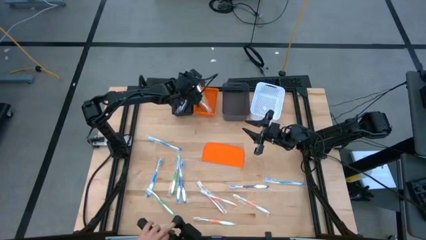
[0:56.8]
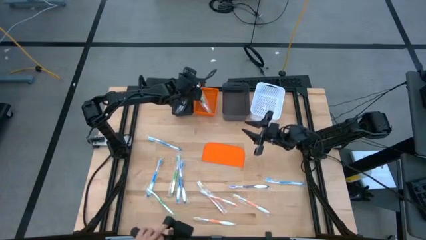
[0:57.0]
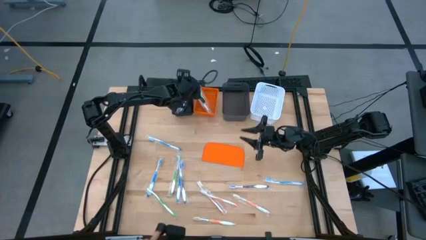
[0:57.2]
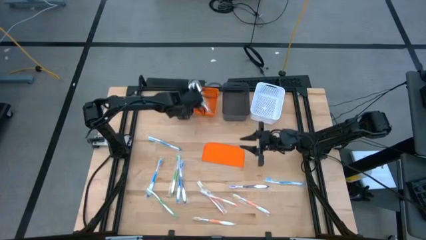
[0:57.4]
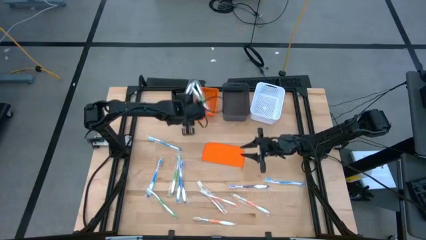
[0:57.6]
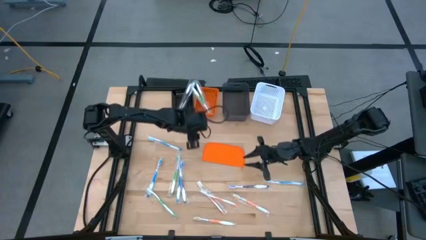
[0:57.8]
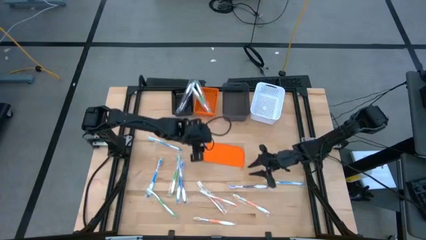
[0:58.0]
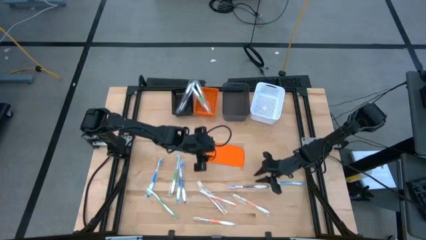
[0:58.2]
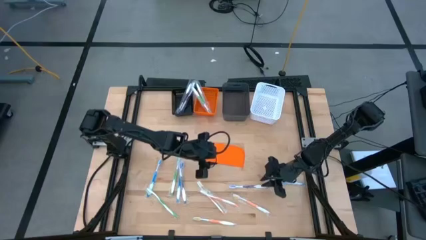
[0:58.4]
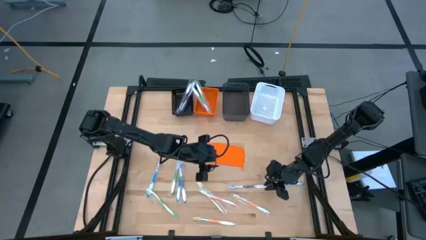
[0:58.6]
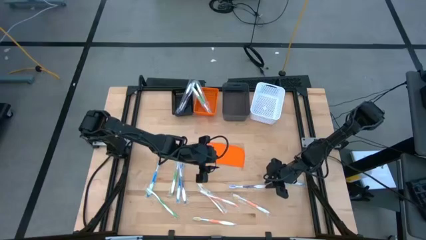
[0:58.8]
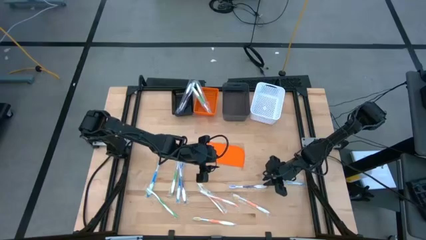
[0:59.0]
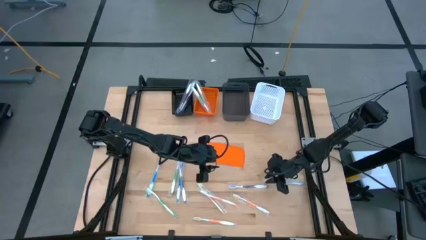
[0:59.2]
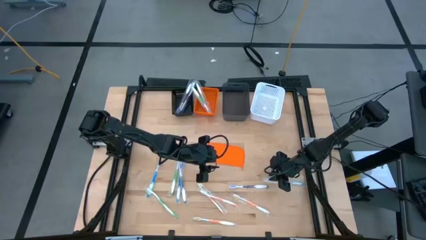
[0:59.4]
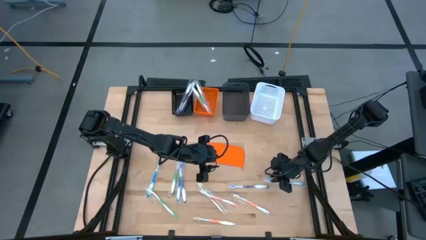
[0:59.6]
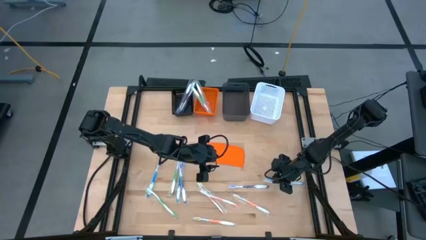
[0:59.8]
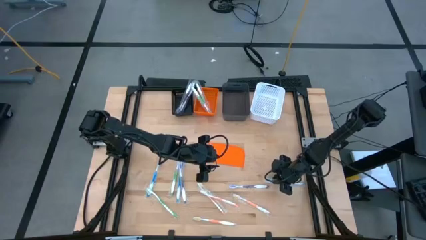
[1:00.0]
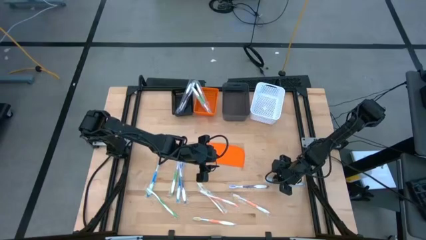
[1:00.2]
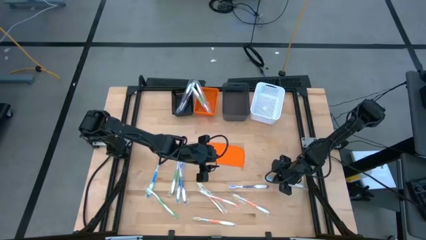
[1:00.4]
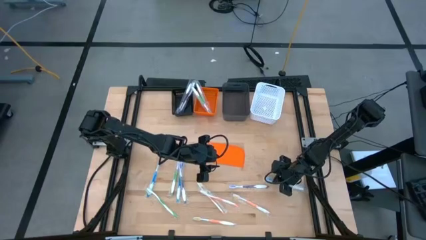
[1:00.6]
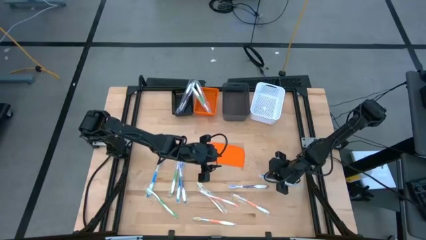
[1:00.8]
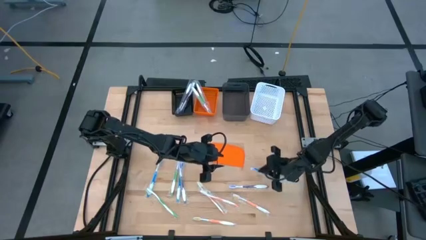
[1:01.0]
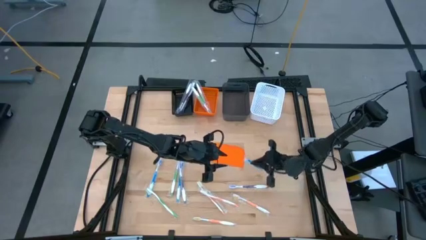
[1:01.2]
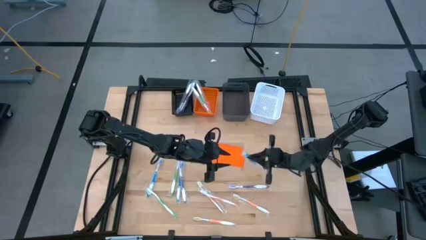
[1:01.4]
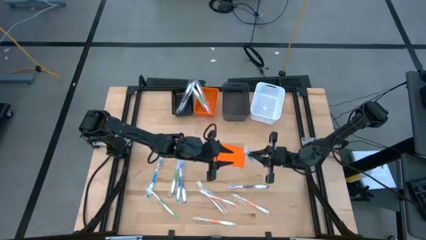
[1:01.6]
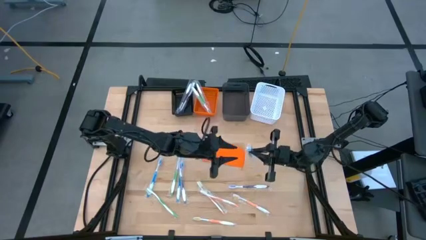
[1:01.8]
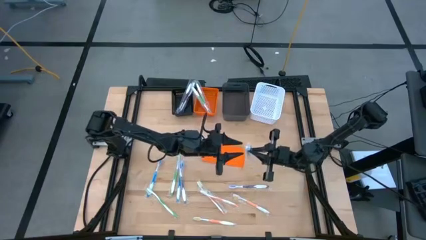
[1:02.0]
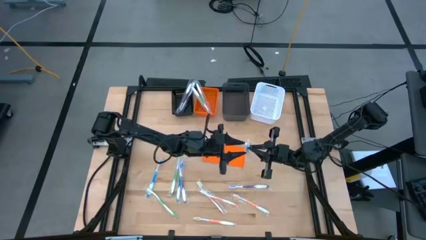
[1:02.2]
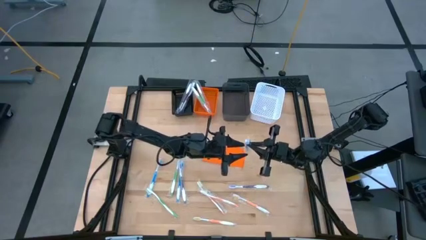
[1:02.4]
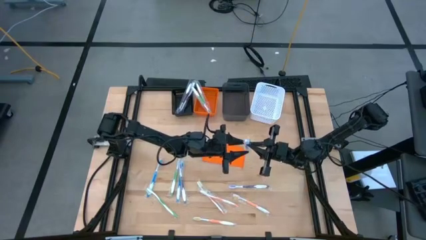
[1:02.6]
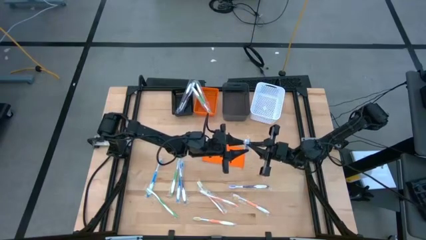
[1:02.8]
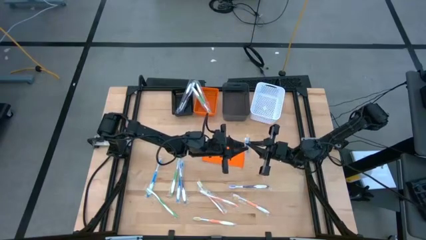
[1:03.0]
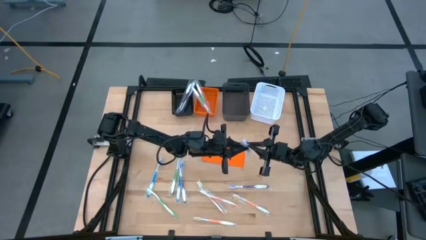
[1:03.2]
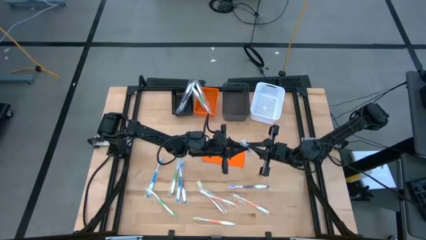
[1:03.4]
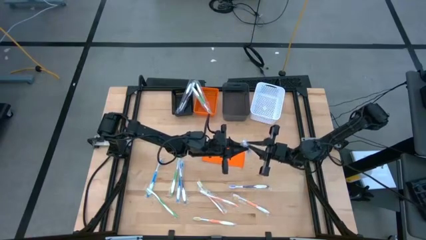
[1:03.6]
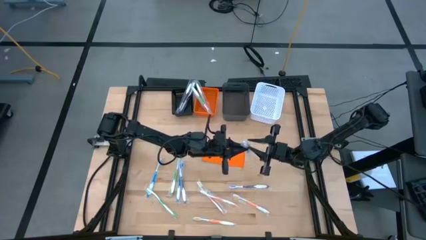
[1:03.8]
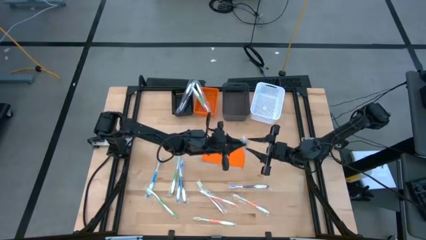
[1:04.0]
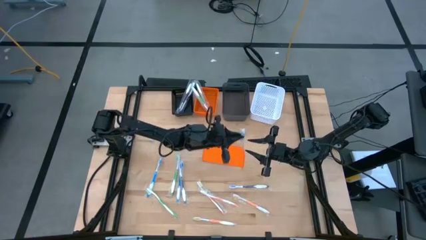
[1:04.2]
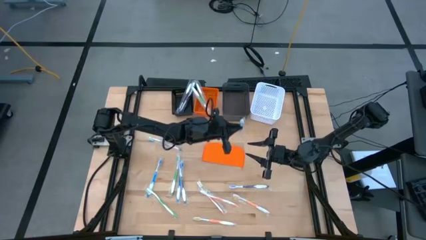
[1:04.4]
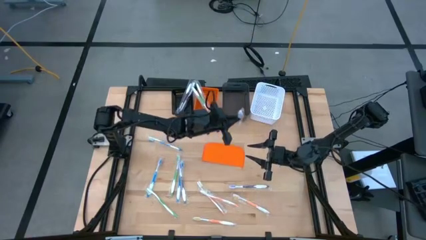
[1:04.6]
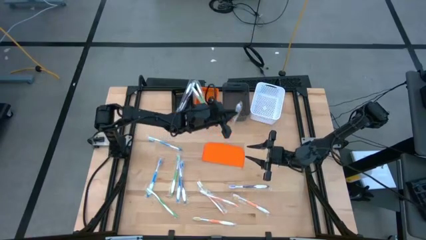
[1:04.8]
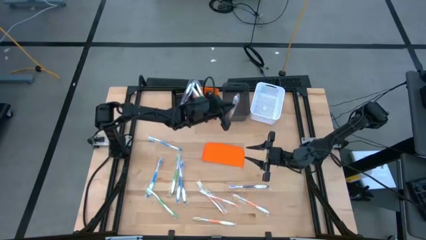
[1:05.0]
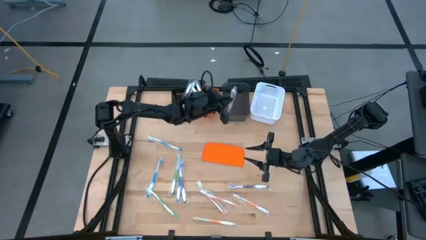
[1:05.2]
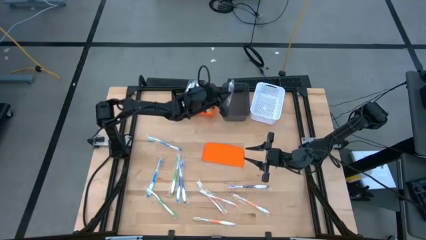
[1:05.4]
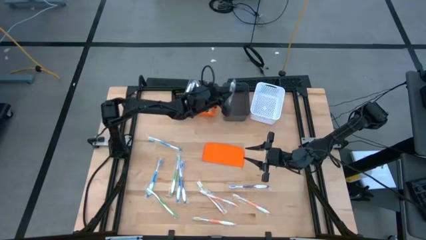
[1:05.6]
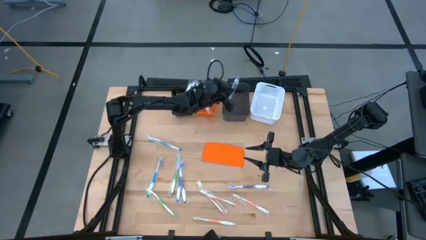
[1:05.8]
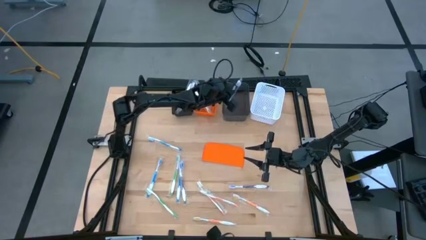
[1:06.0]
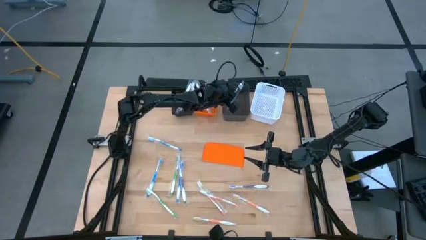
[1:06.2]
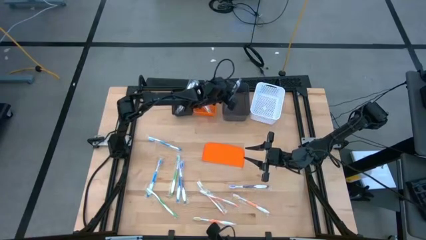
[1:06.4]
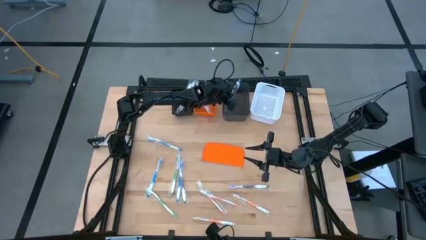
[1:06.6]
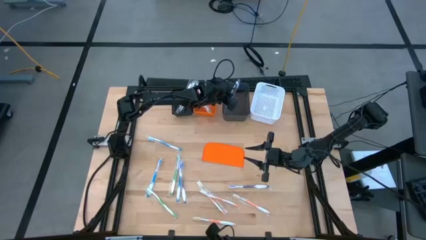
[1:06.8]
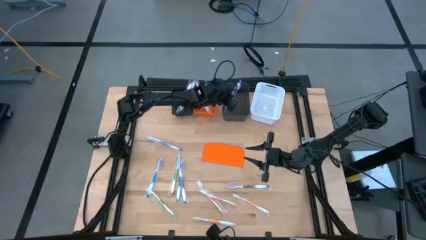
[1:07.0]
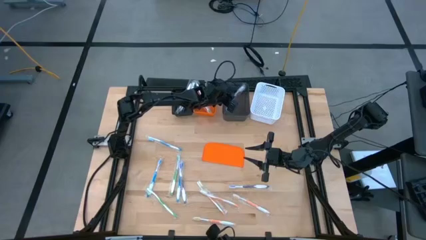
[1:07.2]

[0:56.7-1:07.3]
Task: Pick & Place Toothbrushes
Put the blue toothbrush into the black transparent bin
